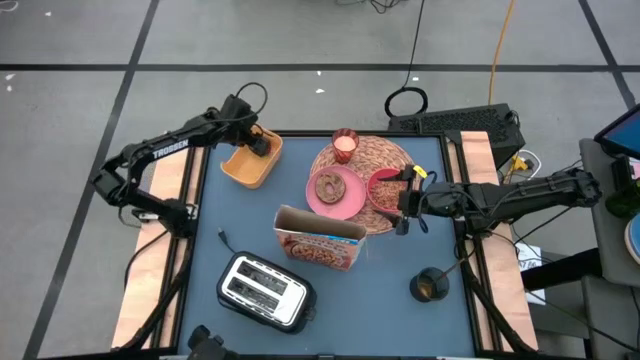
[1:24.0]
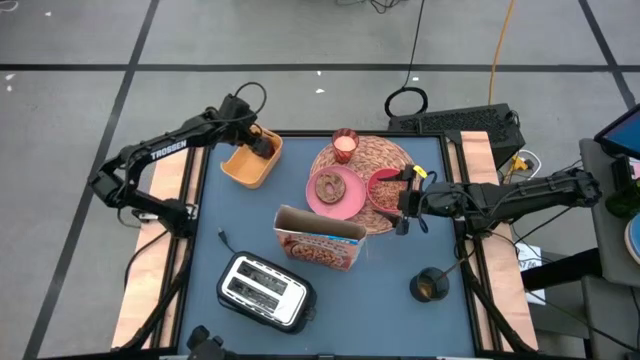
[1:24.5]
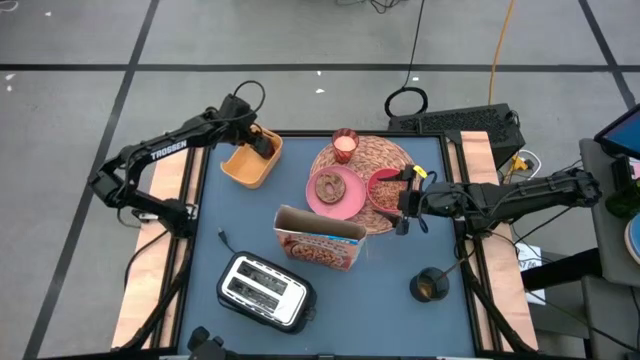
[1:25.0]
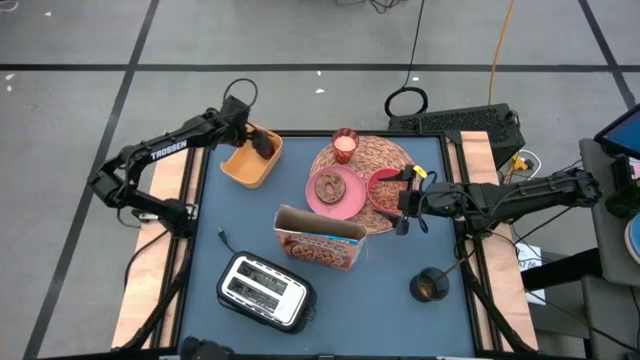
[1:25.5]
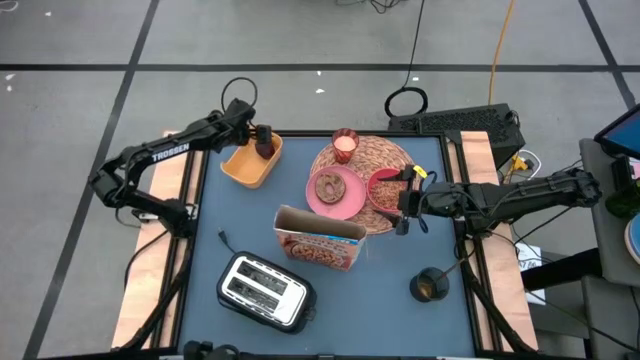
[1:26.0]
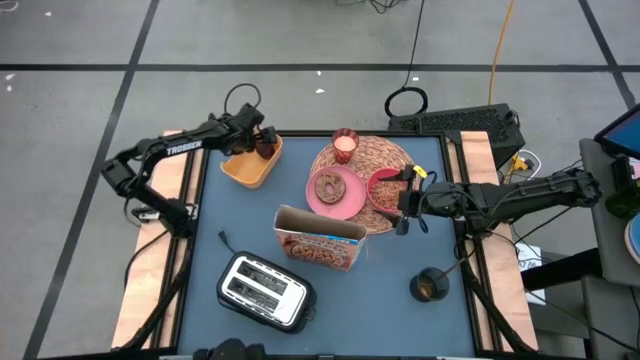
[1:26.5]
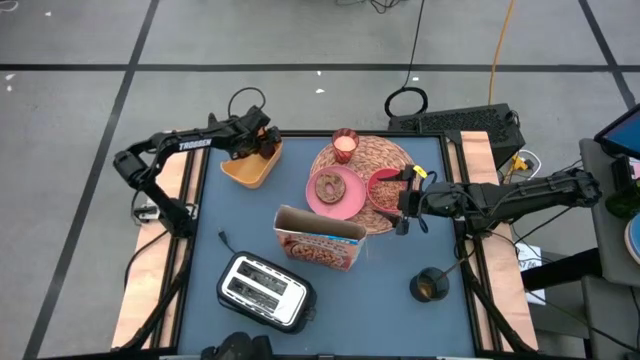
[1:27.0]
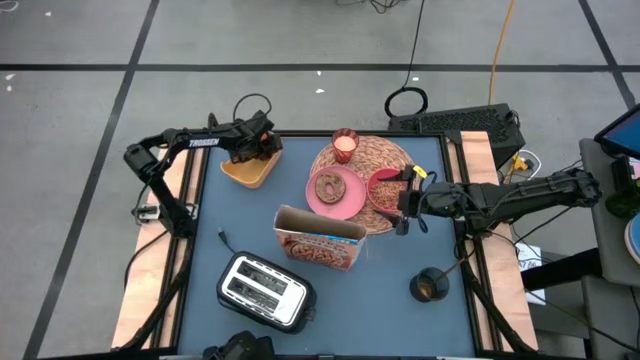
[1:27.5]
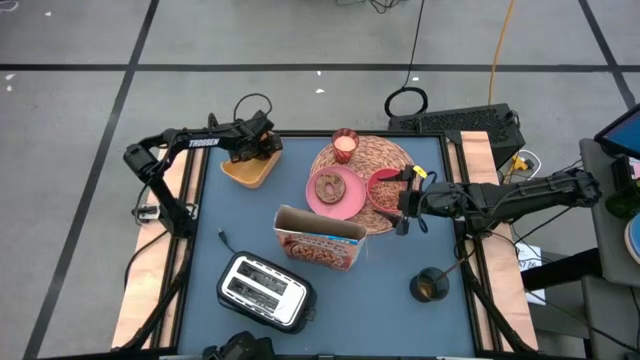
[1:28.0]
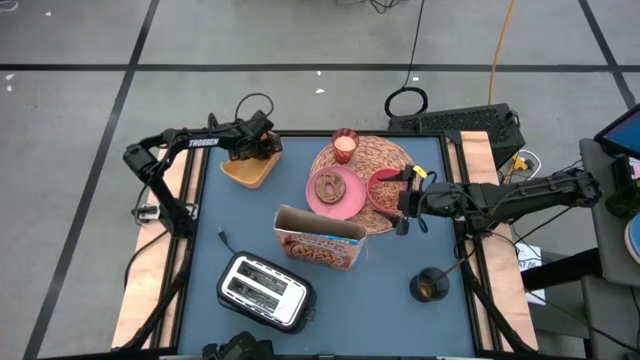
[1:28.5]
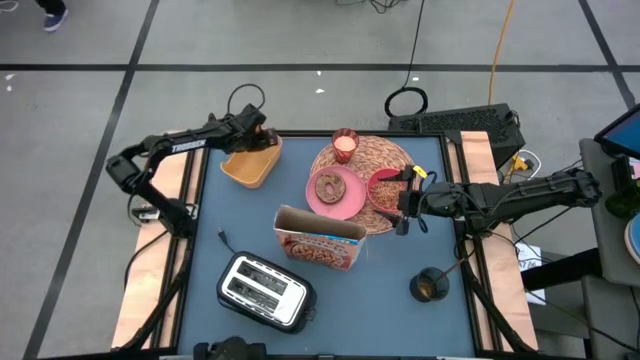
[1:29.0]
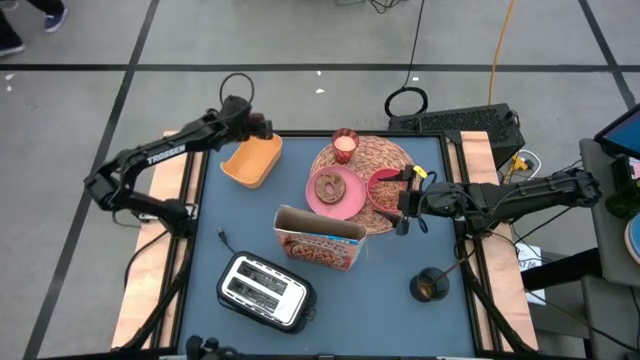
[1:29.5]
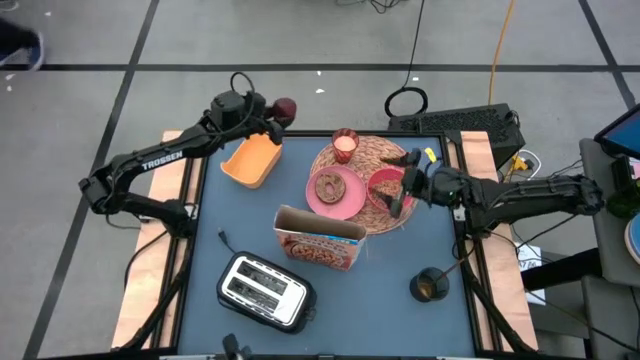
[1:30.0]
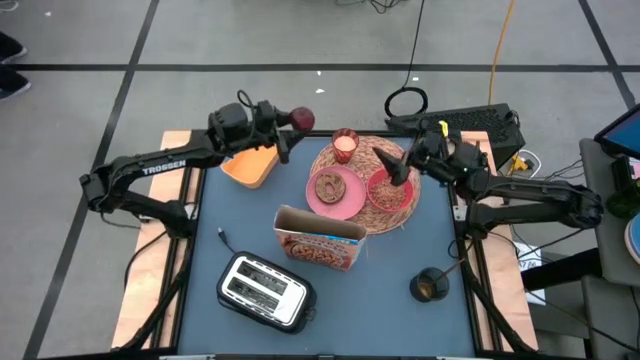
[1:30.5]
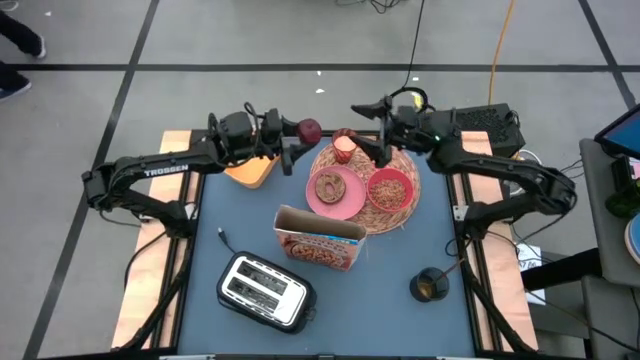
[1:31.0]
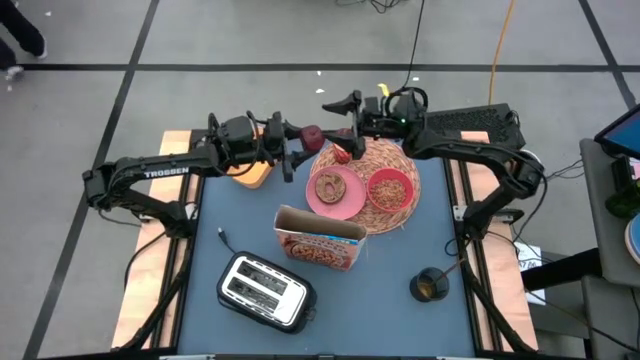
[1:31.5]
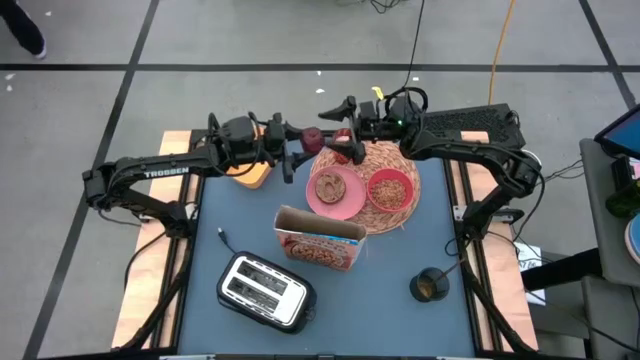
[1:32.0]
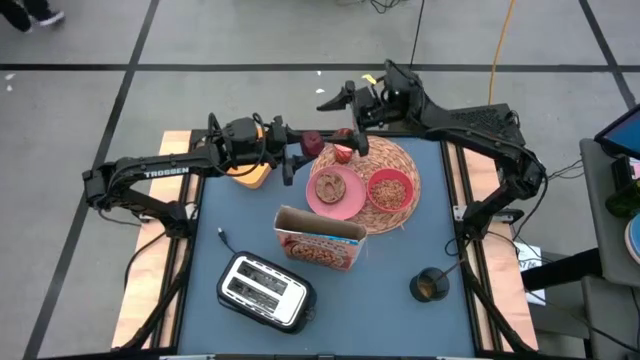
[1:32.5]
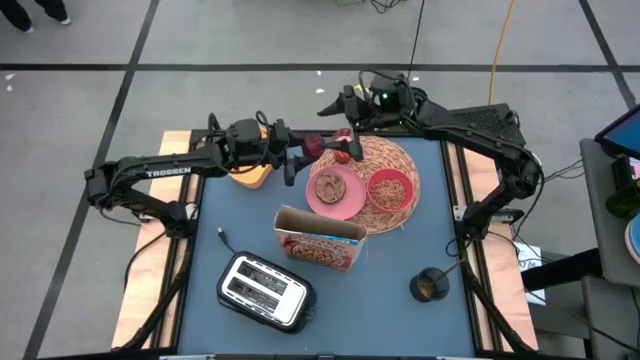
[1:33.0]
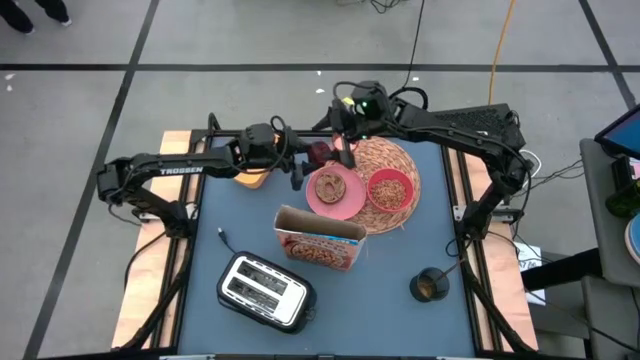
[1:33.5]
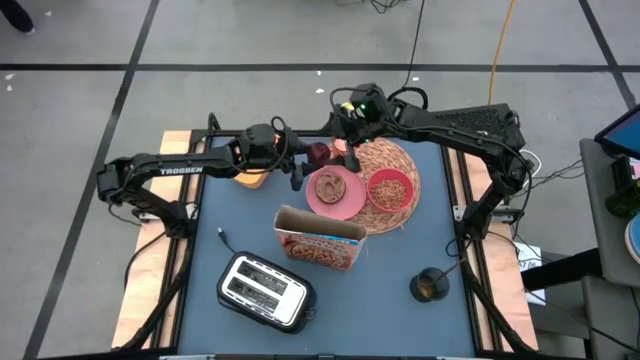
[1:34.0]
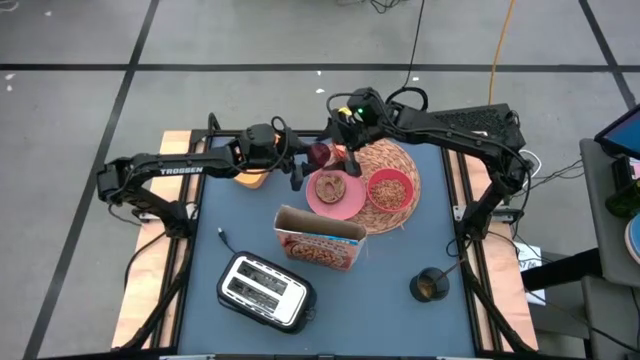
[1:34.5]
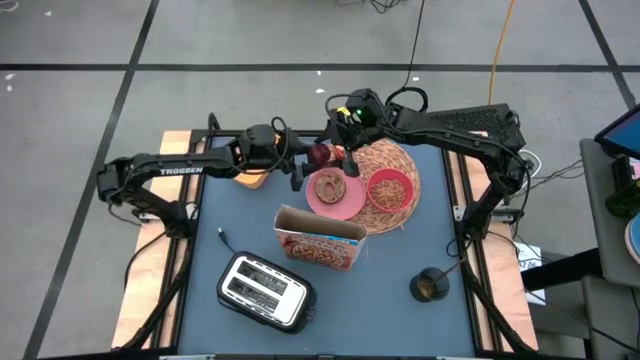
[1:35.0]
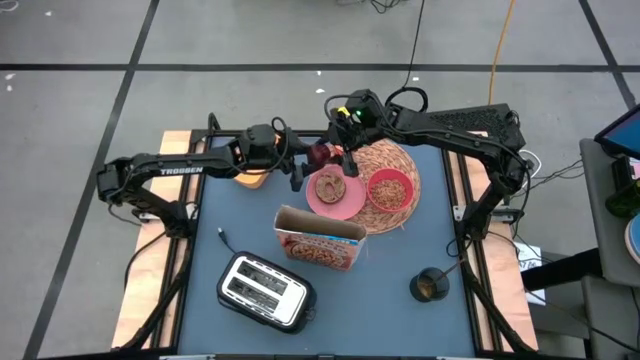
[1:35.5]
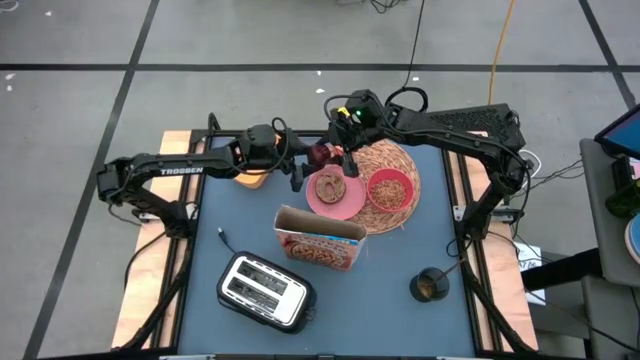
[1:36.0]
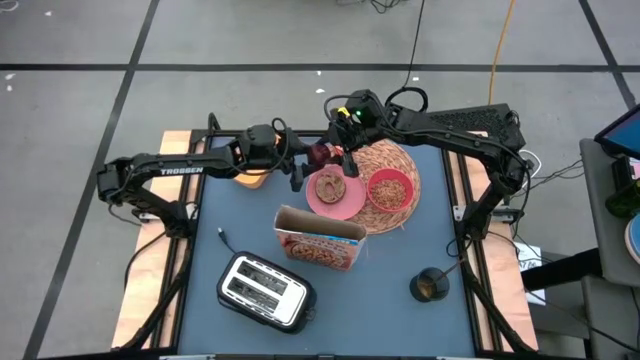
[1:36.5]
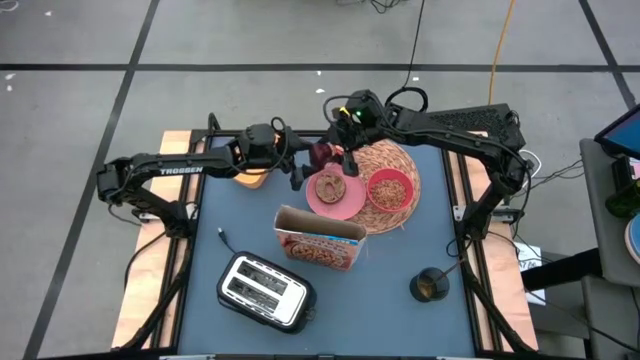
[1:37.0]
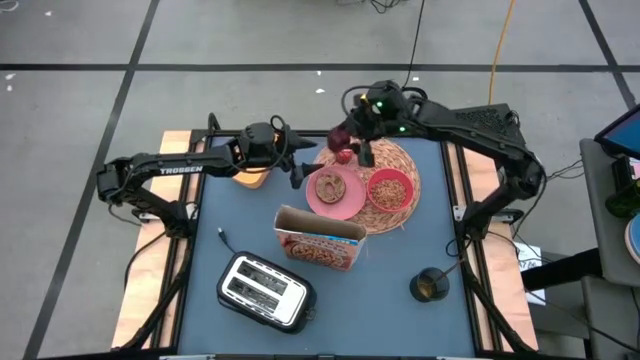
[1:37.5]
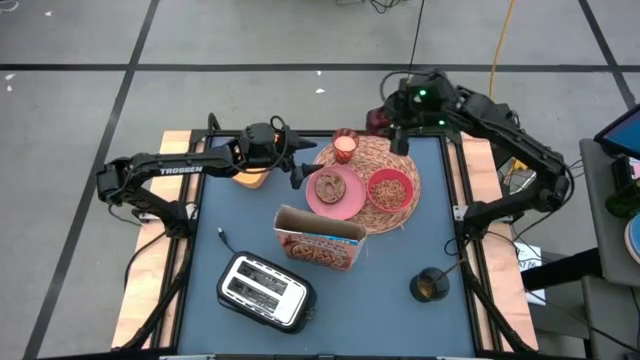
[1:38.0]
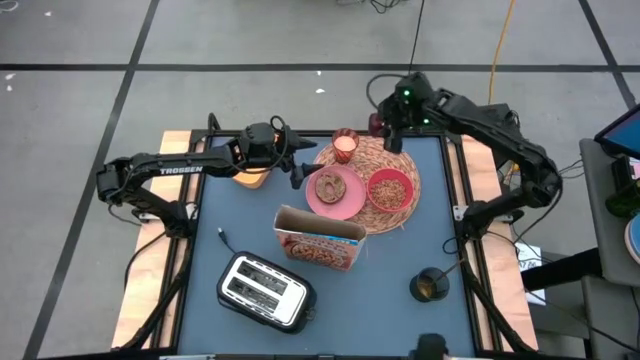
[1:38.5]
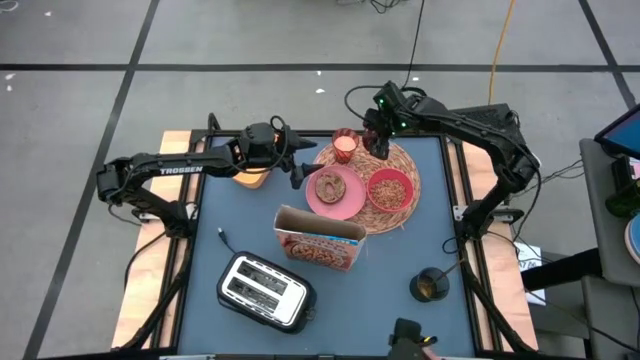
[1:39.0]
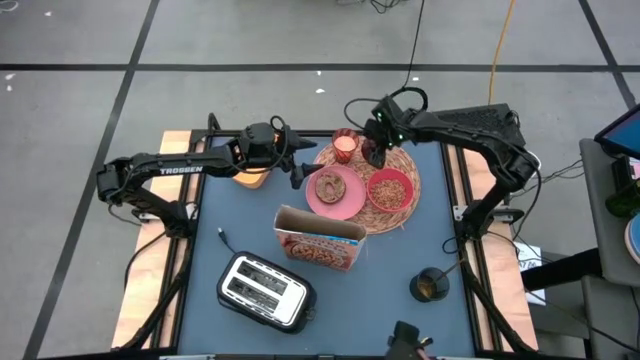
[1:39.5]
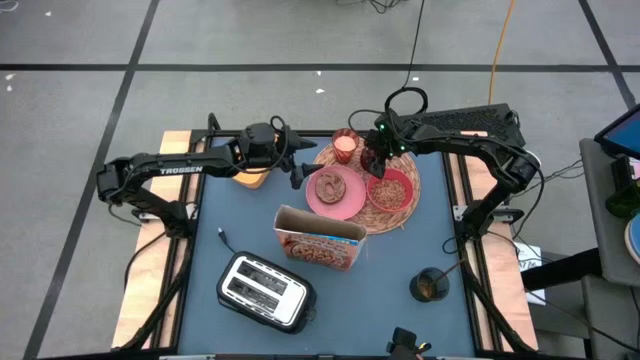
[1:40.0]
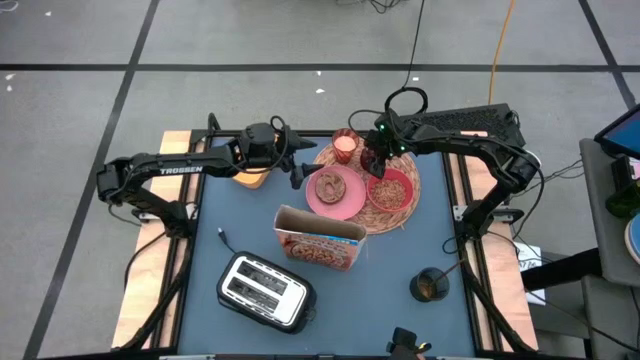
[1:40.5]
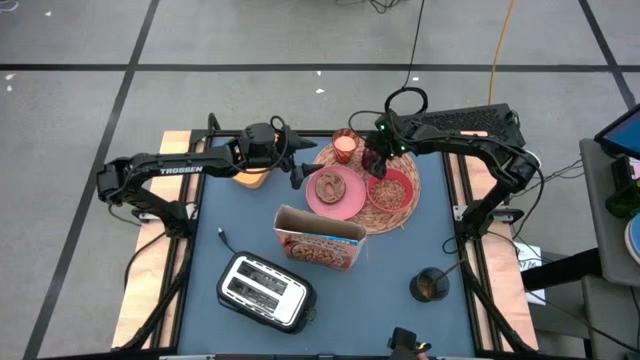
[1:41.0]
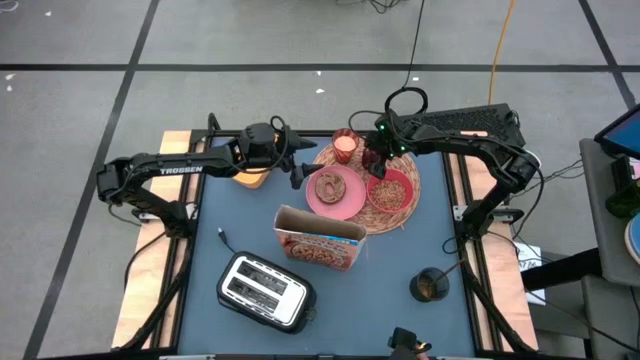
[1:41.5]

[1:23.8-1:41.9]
Task: Arrange a breakfast setting
Put the apple on the tablemat to the top of the red bowl

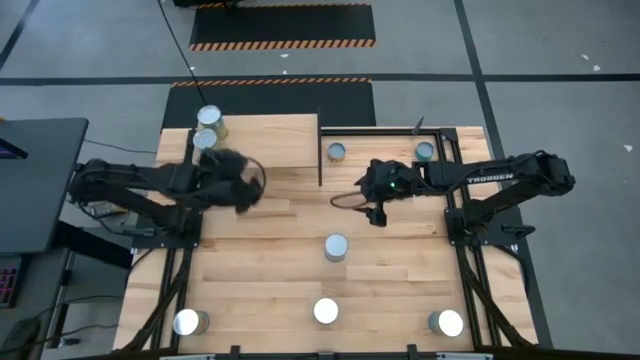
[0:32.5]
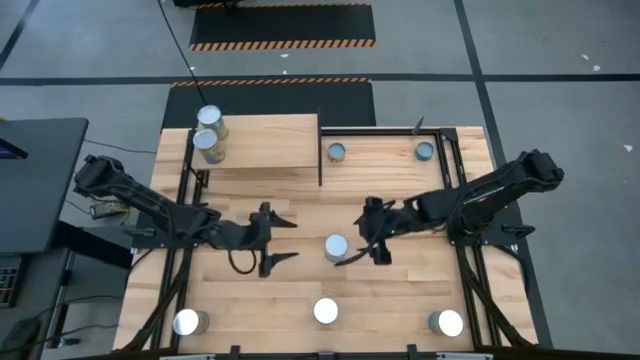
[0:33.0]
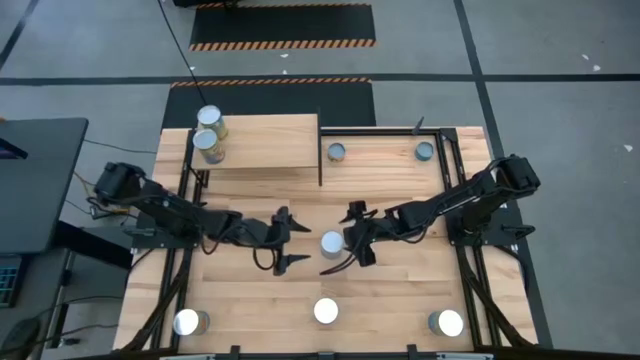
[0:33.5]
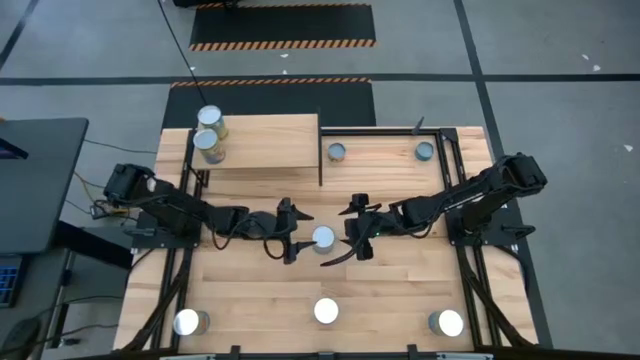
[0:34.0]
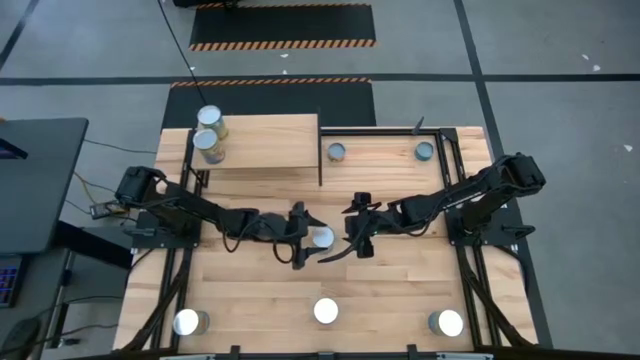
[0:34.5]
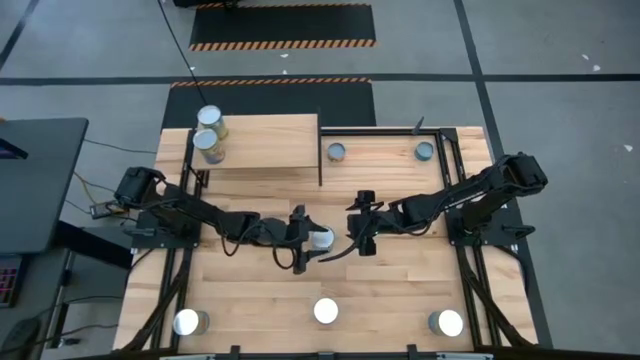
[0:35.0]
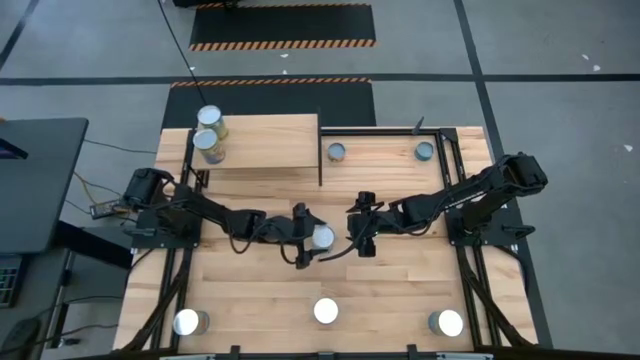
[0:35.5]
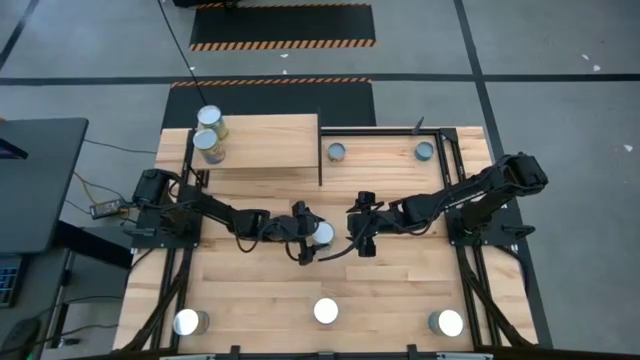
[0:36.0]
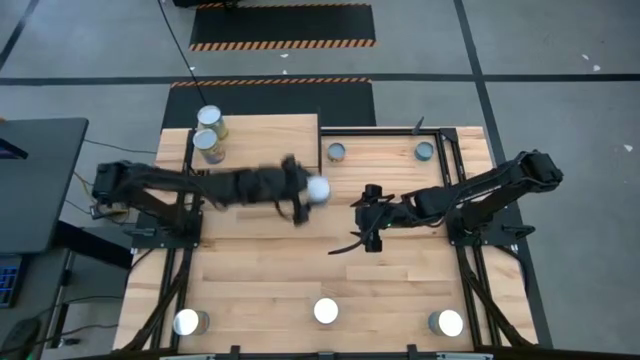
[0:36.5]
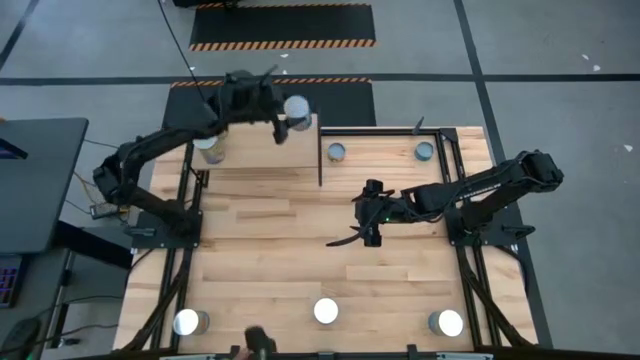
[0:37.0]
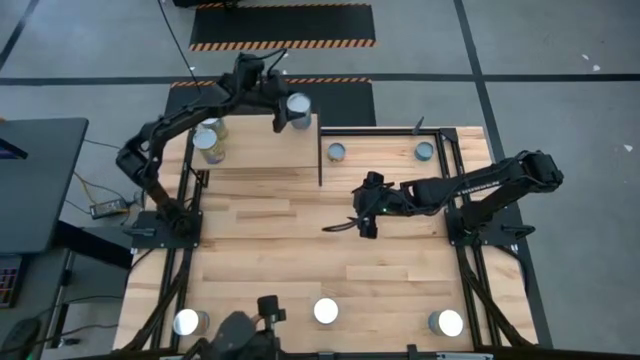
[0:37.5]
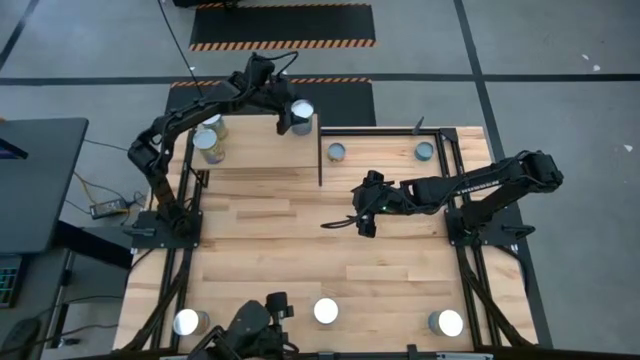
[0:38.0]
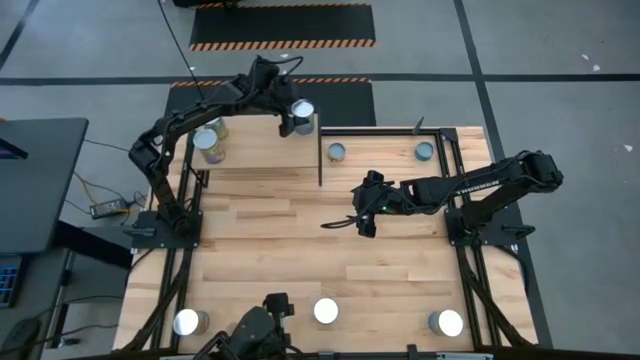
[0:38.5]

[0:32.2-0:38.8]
Task: Pick and place cans onto a shelf
Put the top canned cherries on the shelf
